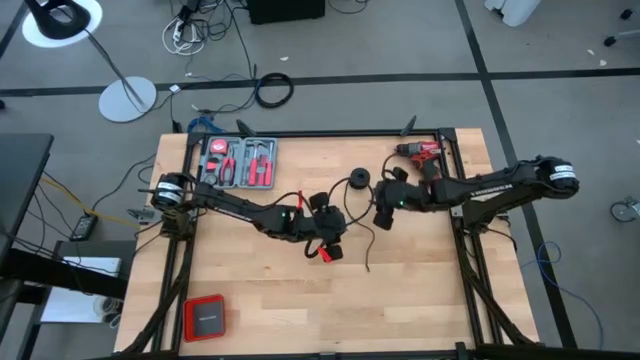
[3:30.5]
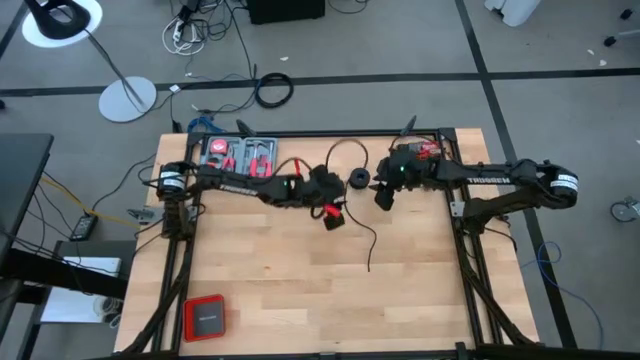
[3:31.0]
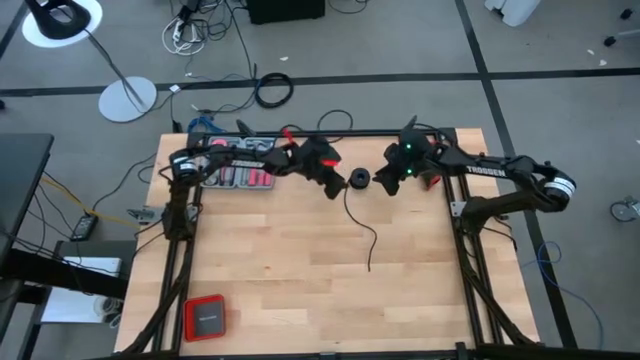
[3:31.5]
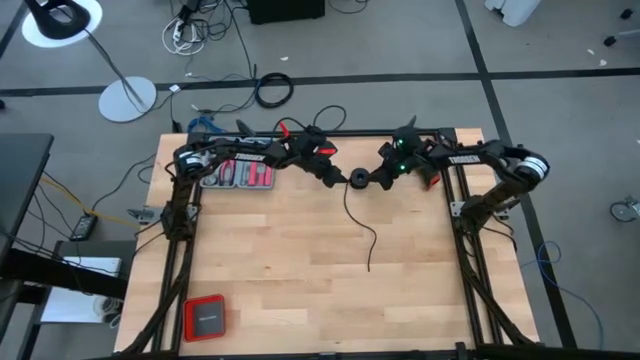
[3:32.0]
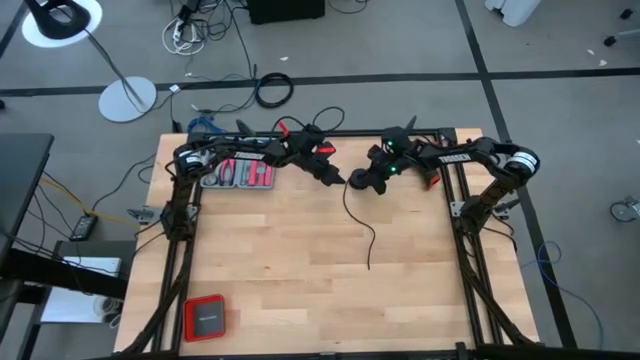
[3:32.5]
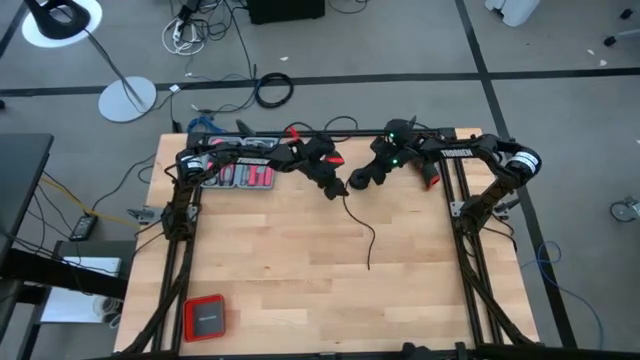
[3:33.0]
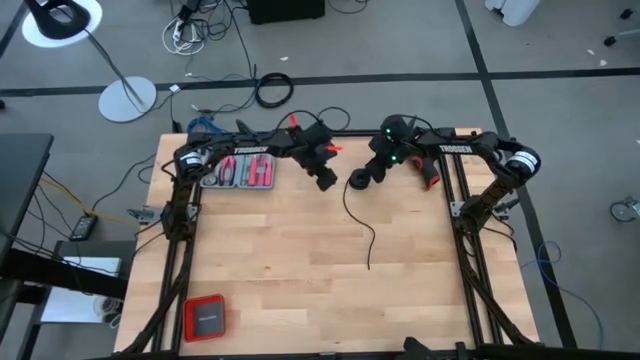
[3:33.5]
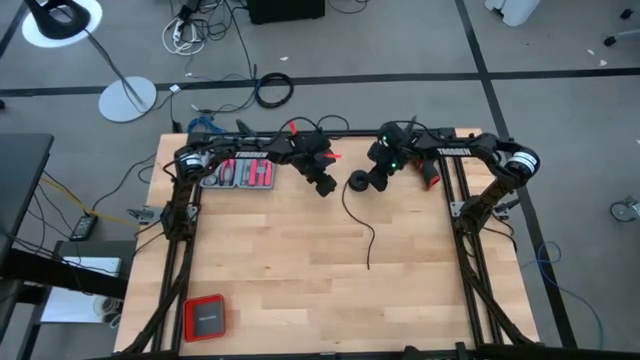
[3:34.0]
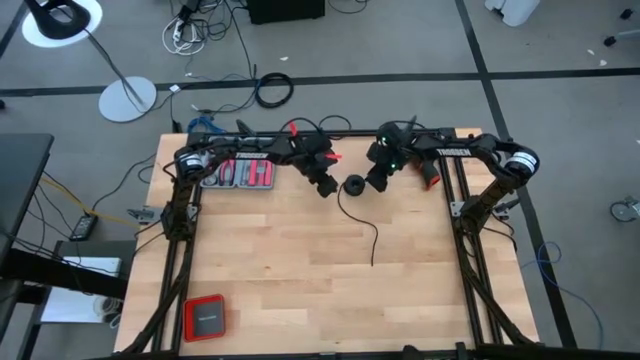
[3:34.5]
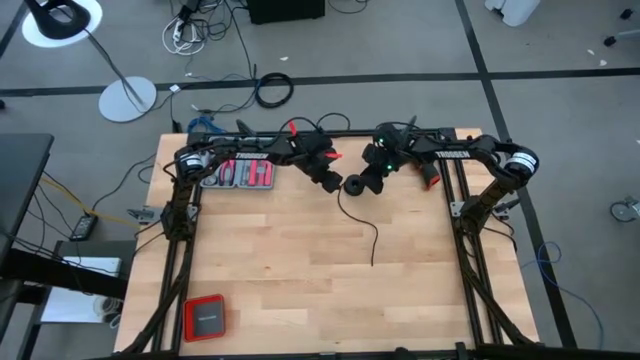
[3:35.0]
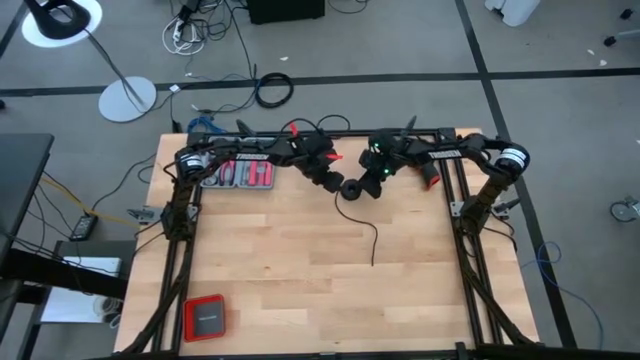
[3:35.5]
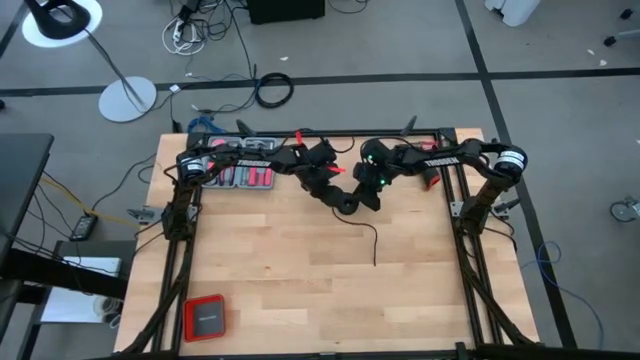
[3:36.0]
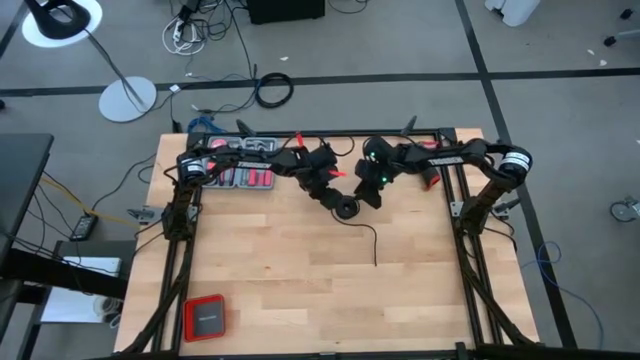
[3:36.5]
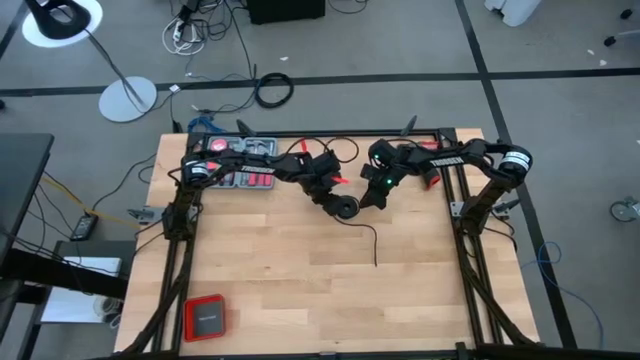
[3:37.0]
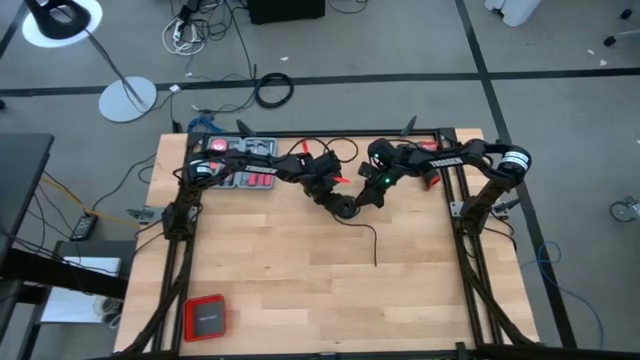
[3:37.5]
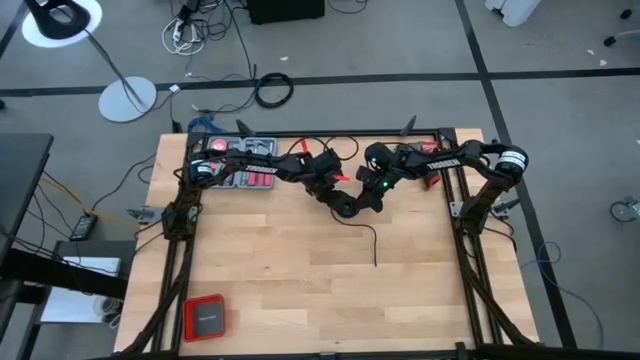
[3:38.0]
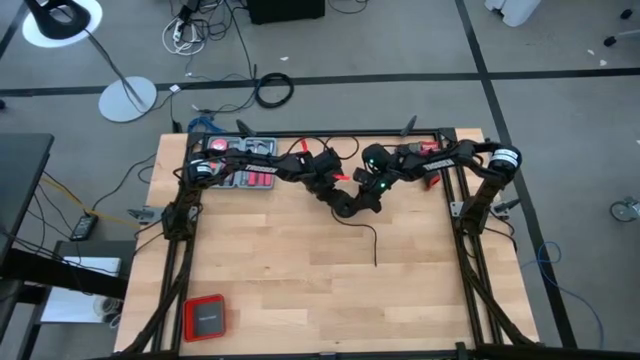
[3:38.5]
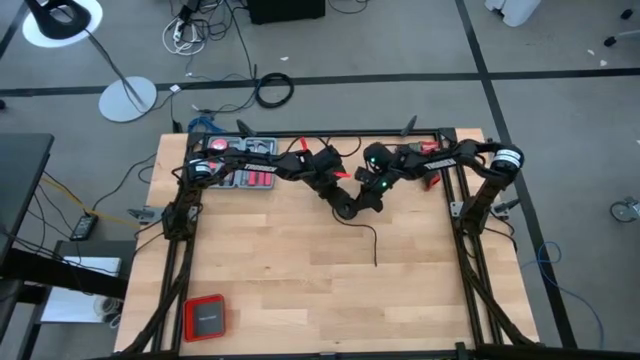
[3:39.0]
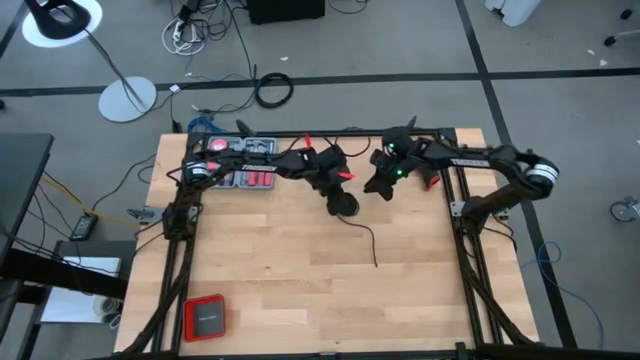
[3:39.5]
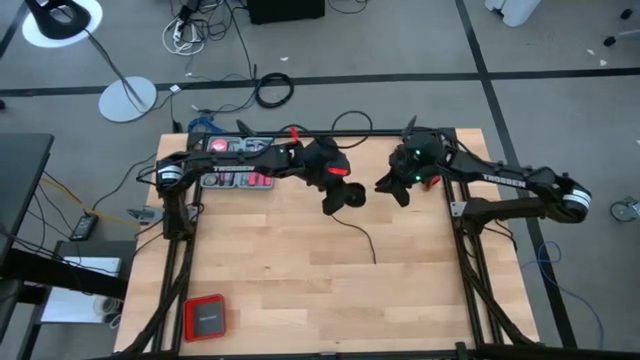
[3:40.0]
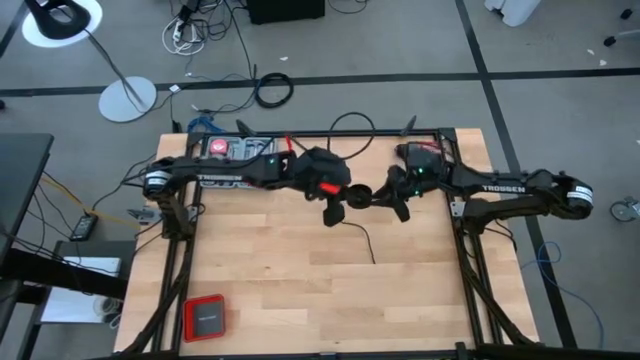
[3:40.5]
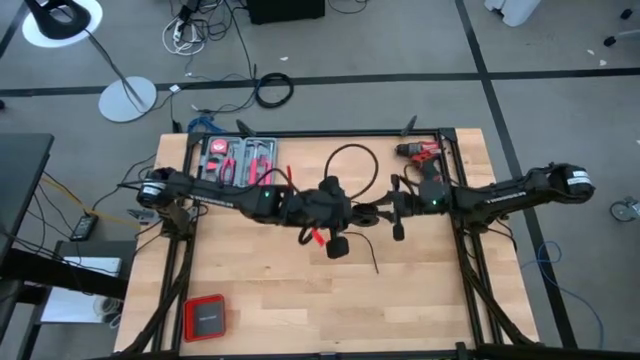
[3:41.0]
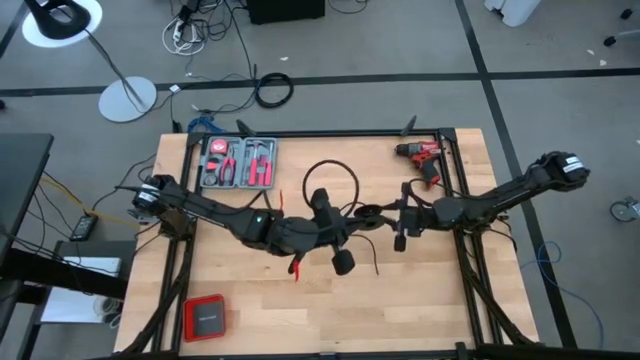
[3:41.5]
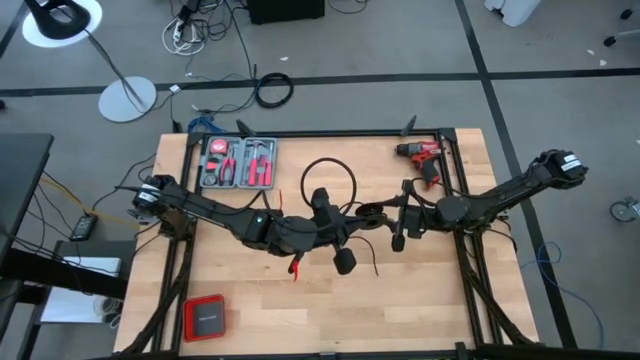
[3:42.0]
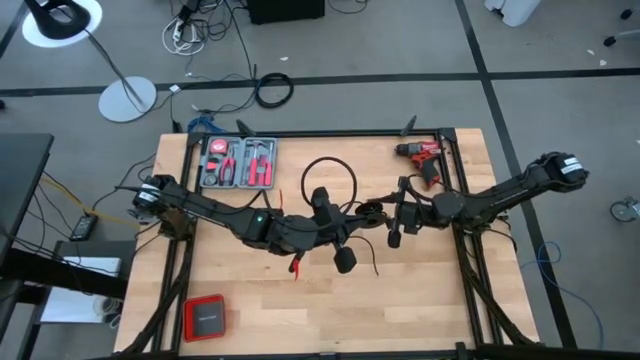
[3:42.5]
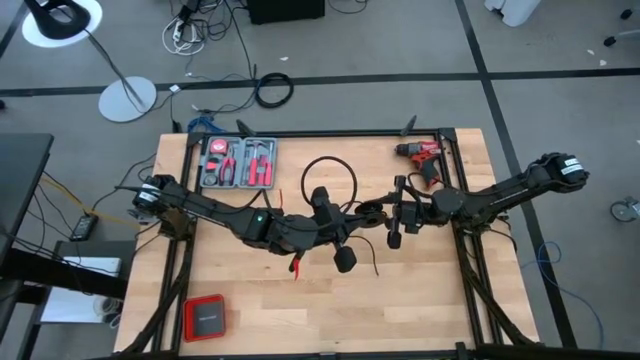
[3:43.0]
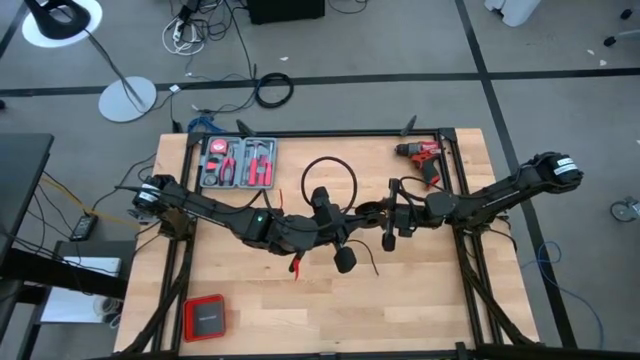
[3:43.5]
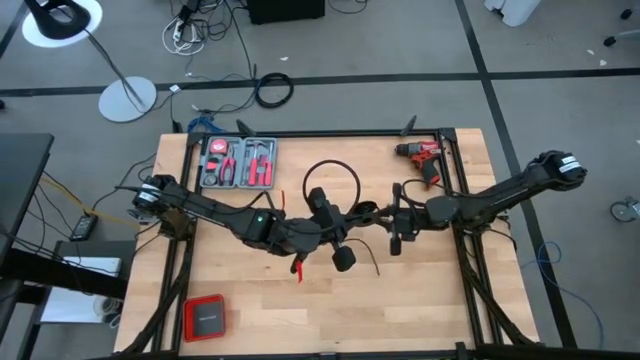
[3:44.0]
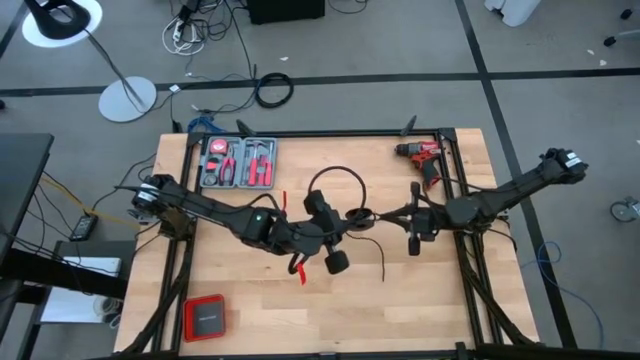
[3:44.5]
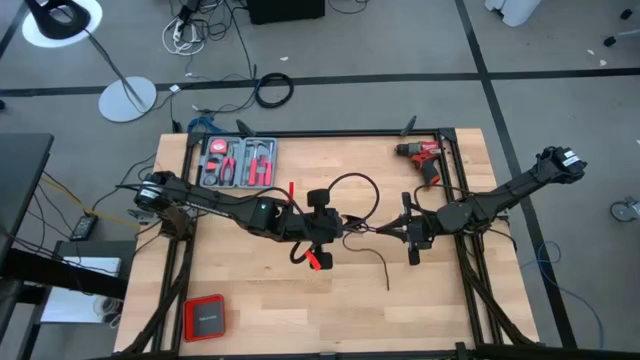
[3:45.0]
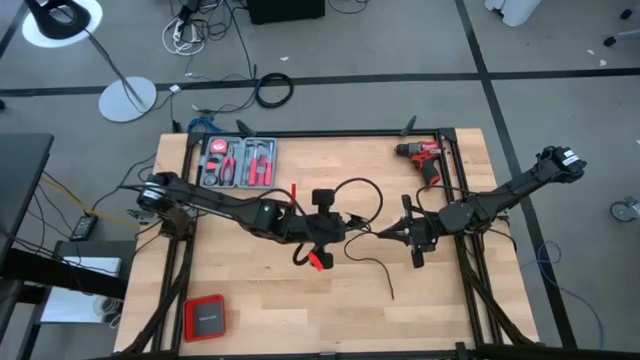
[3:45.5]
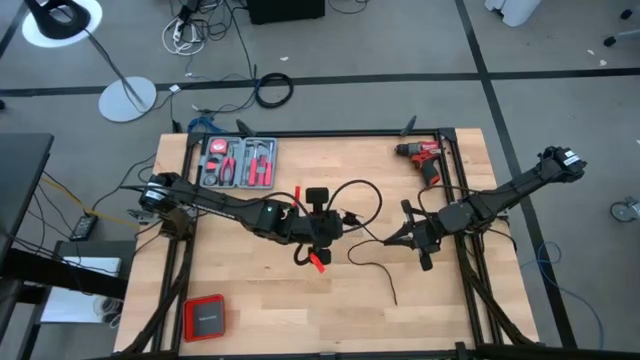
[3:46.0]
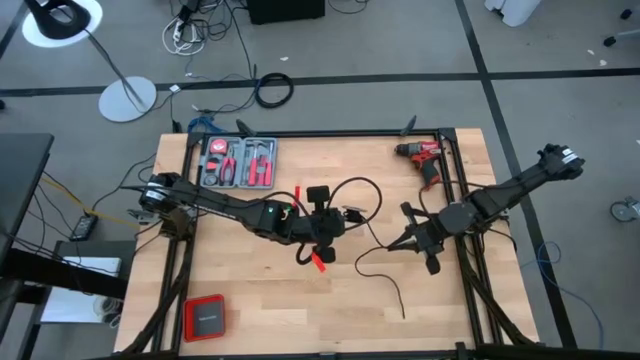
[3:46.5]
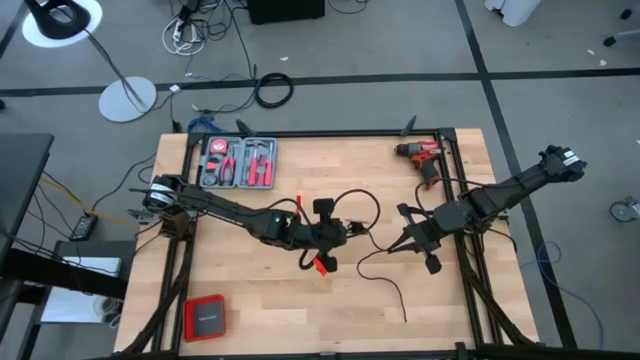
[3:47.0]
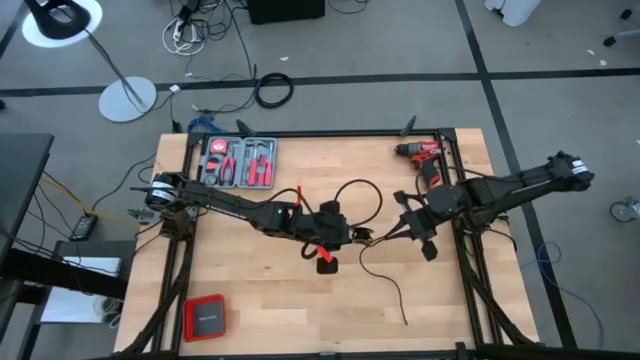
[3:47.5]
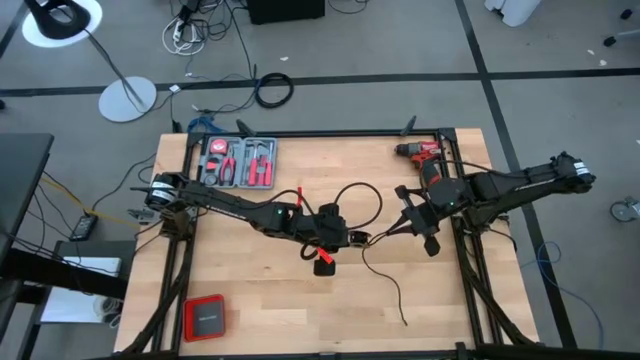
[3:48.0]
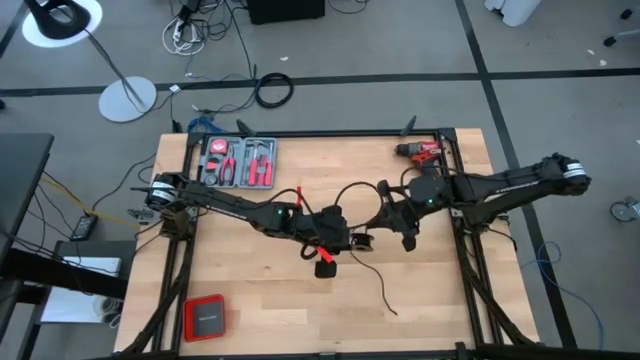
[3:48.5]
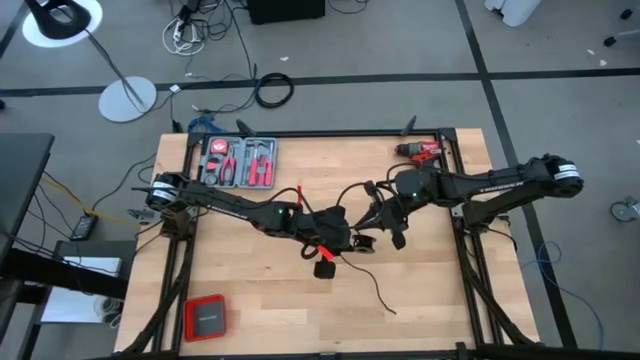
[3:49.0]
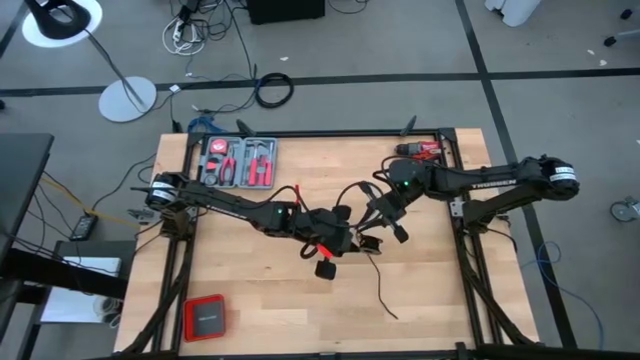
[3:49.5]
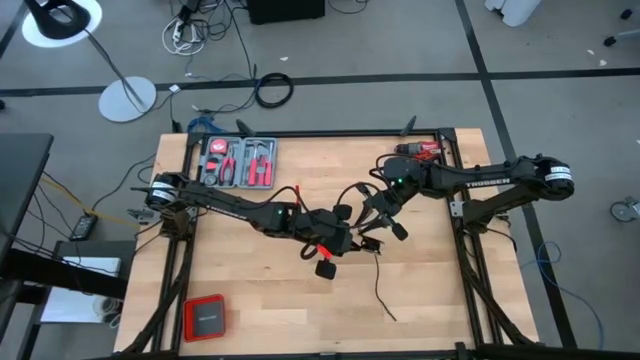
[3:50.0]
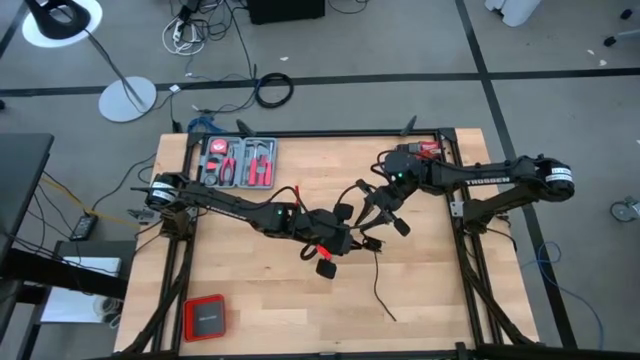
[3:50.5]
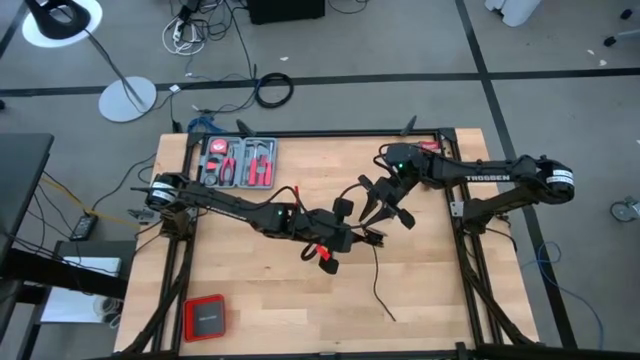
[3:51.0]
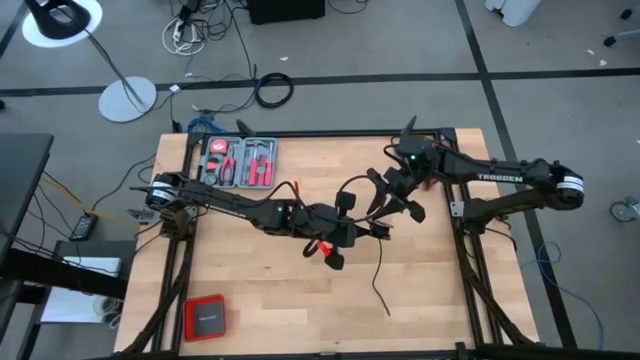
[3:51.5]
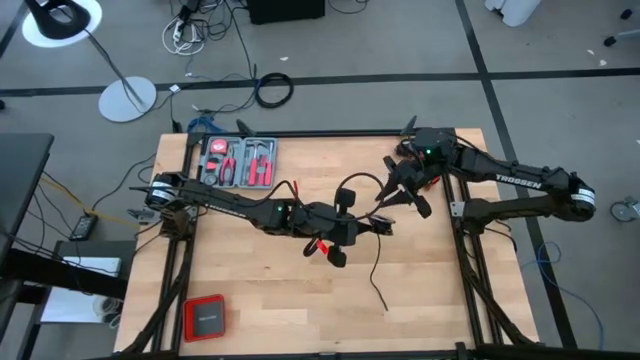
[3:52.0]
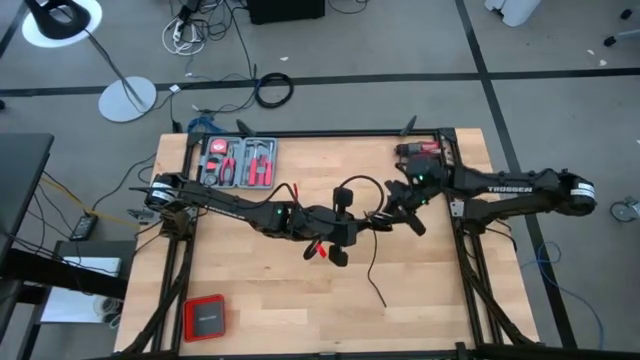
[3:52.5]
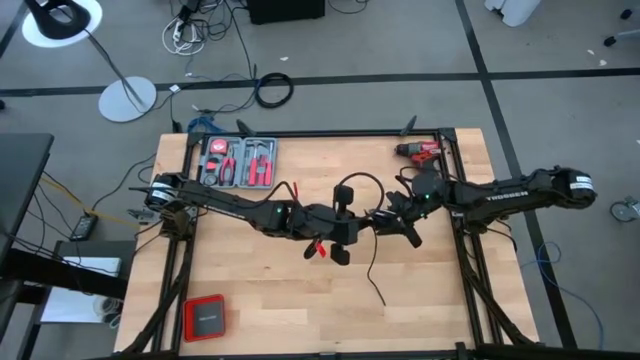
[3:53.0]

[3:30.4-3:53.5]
Task: Coil cords
Coil the black wire on the spool
